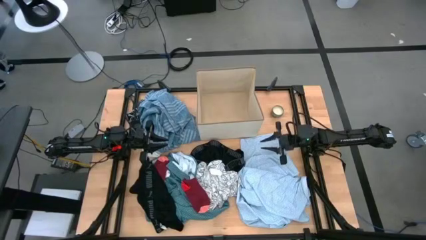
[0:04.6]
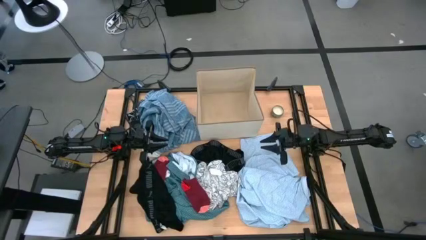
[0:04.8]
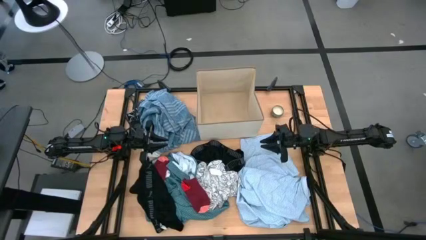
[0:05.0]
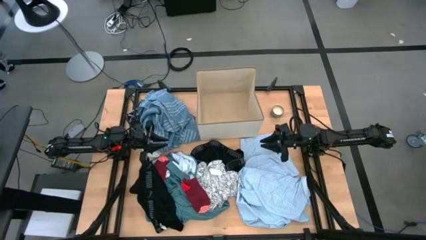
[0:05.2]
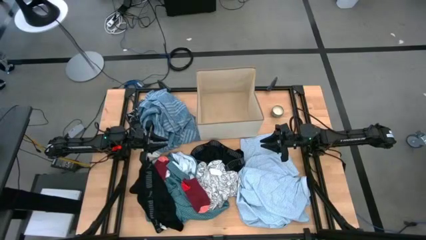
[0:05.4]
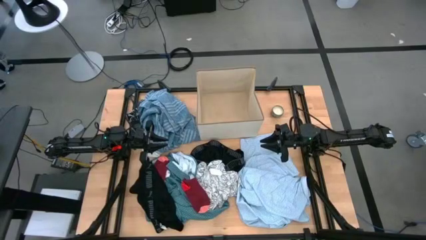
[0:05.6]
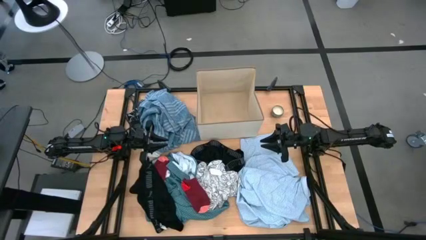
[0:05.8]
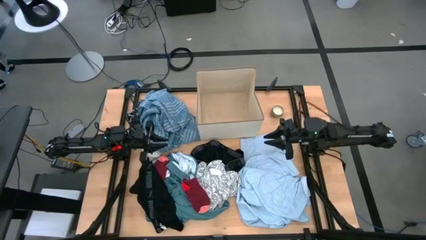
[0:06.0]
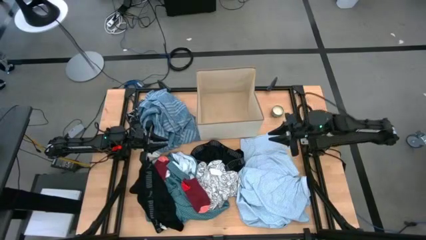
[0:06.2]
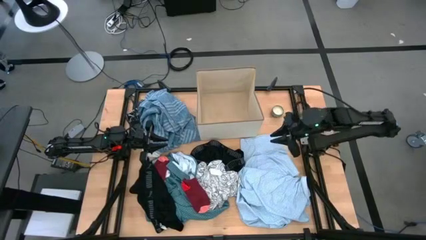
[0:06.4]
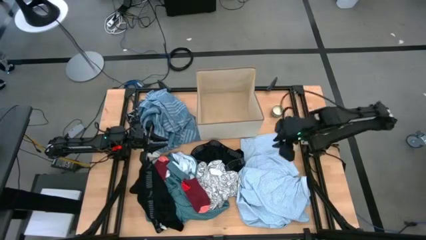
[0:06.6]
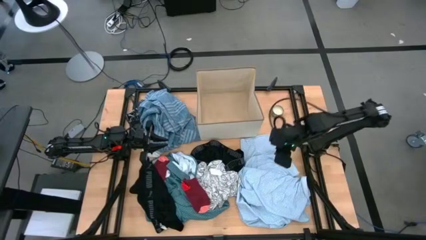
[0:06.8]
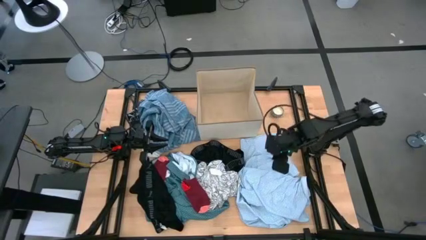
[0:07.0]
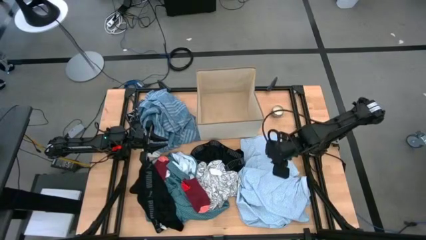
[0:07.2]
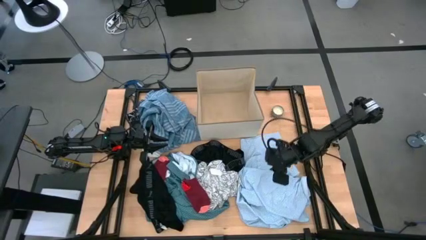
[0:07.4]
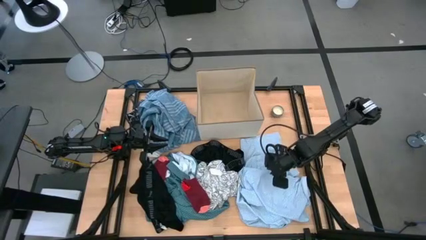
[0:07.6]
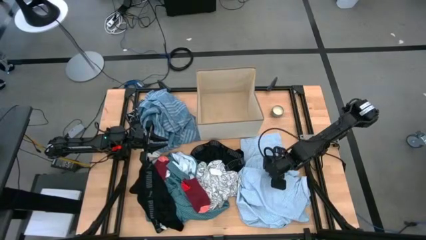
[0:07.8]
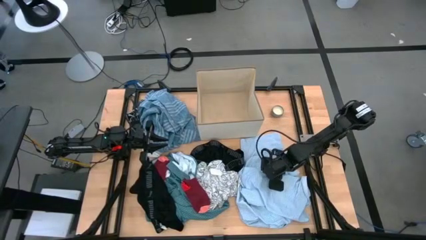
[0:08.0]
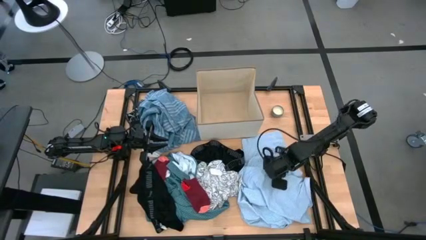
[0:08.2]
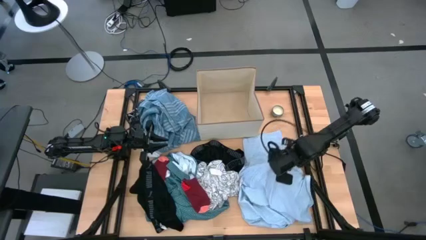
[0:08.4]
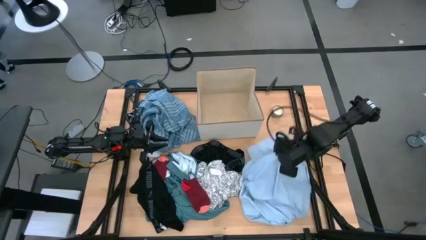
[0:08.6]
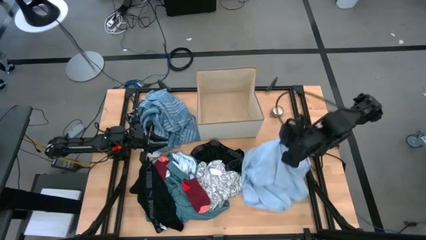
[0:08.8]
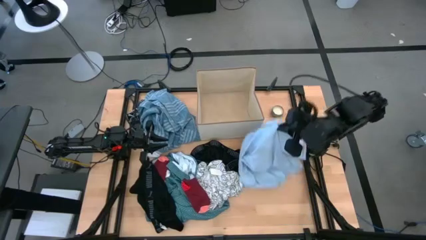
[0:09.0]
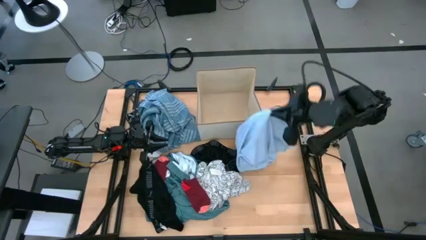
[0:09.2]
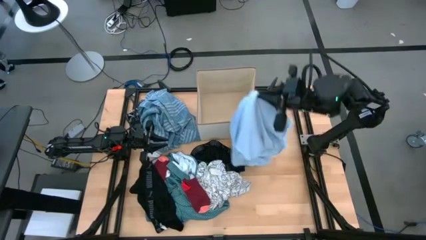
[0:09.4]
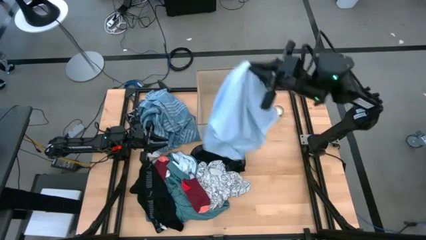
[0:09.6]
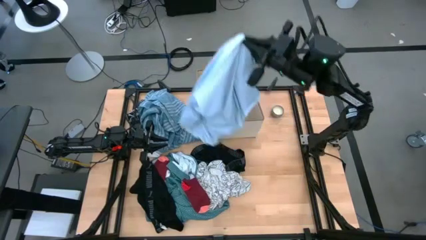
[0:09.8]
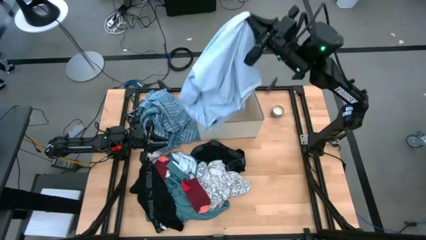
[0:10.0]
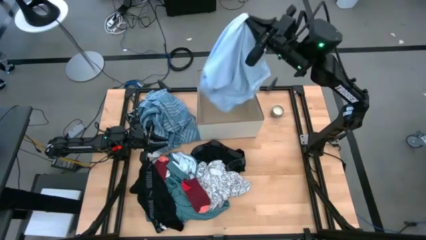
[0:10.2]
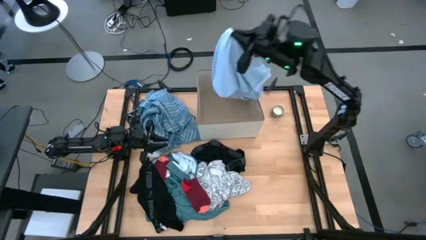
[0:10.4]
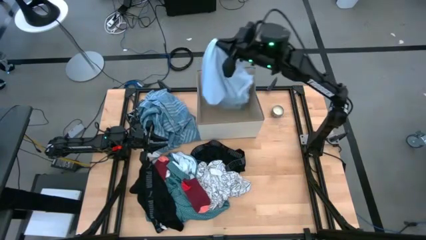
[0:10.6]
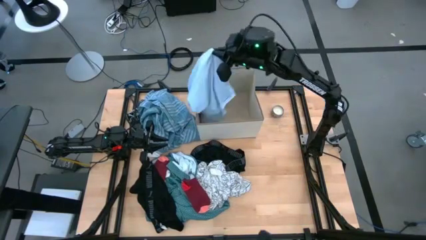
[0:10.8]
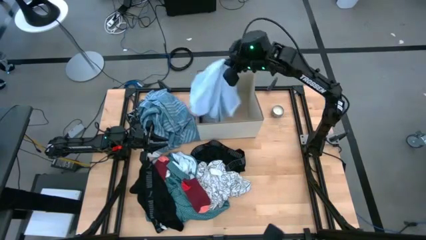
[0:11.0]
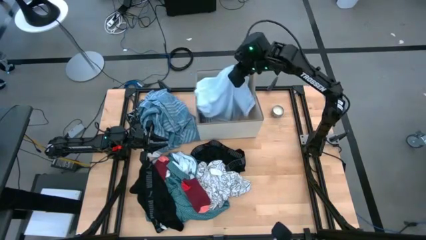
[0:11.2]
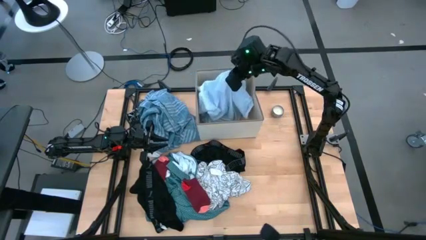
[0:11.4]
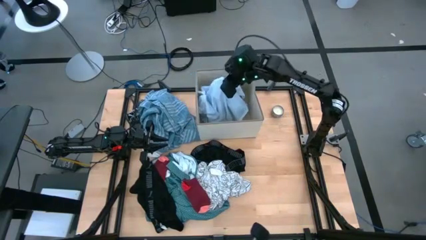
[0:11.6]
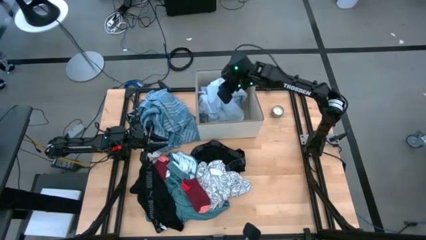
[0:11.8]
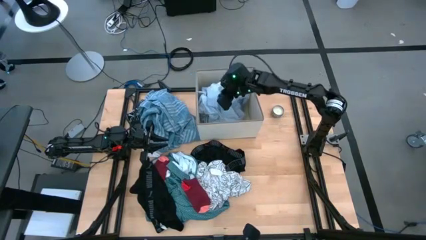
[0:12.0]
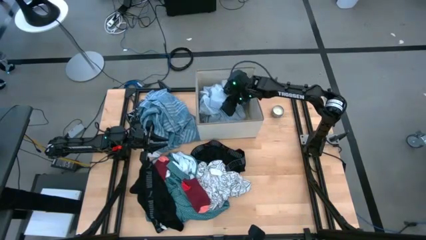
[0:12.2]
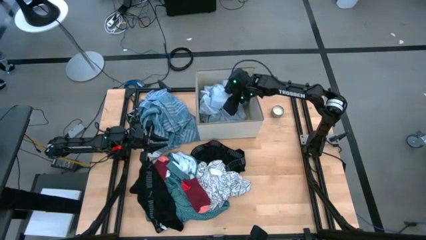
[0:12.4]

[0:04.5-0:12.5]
Task: Sort clothes
Put the white shirt into the bin

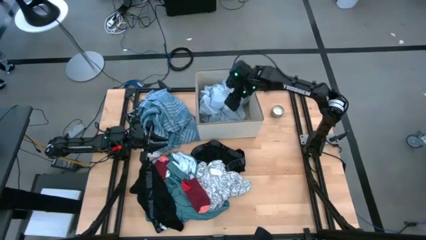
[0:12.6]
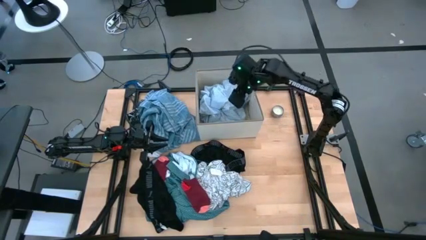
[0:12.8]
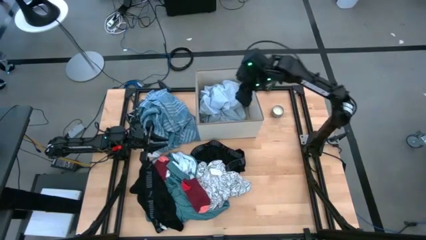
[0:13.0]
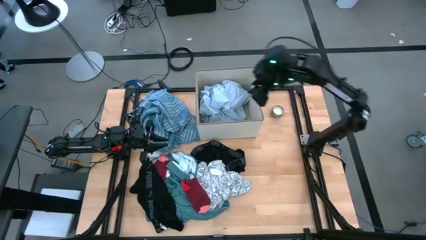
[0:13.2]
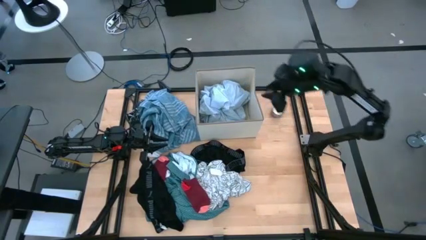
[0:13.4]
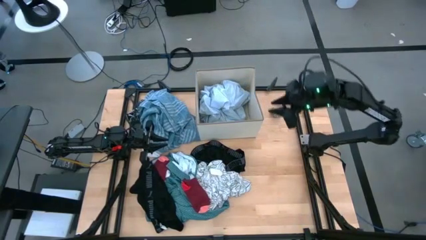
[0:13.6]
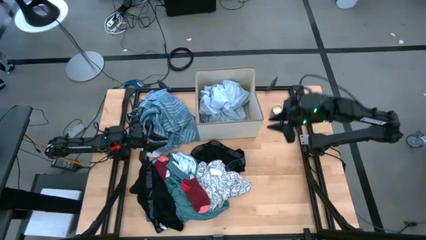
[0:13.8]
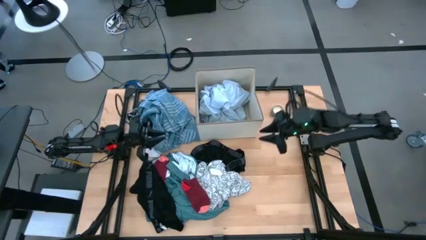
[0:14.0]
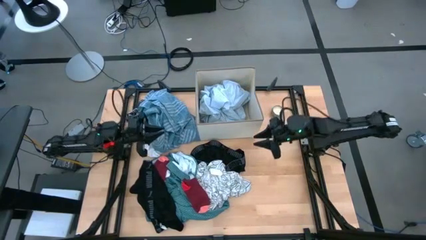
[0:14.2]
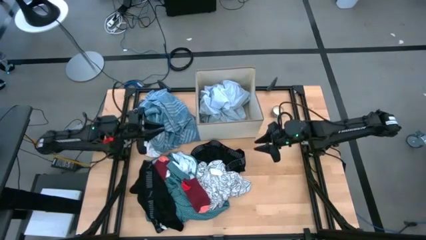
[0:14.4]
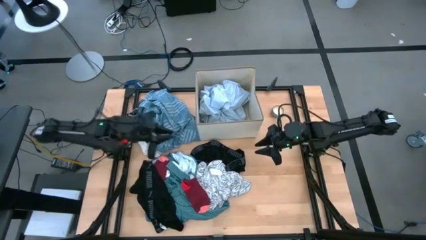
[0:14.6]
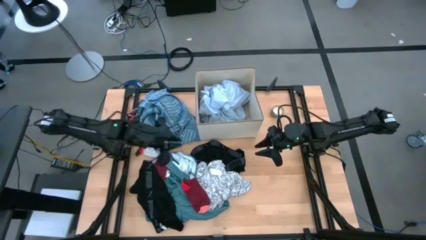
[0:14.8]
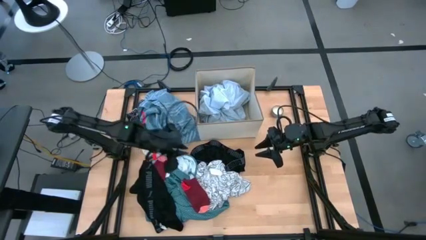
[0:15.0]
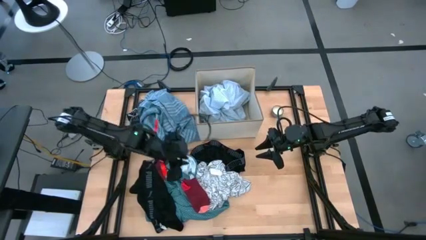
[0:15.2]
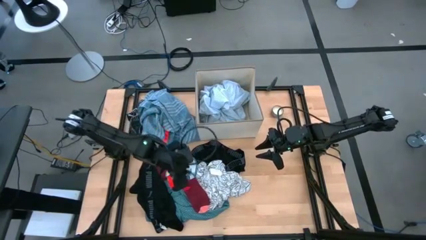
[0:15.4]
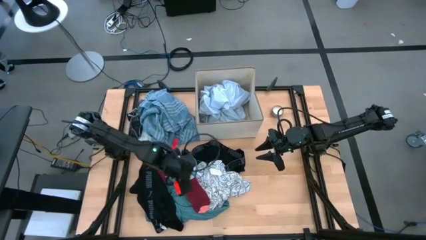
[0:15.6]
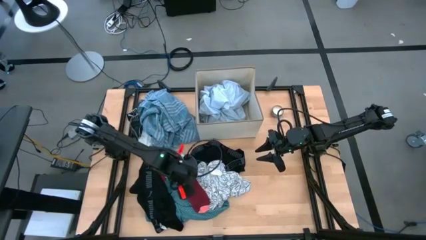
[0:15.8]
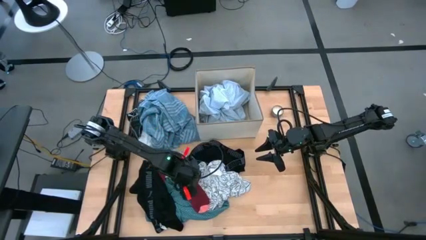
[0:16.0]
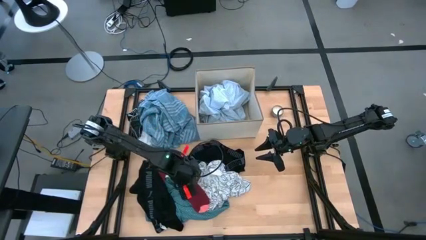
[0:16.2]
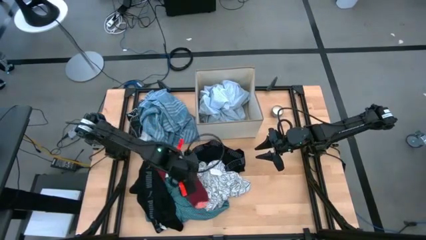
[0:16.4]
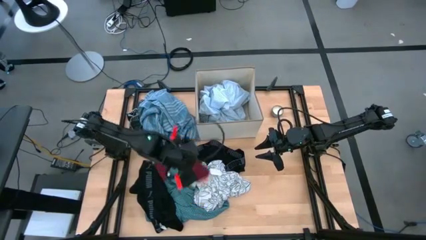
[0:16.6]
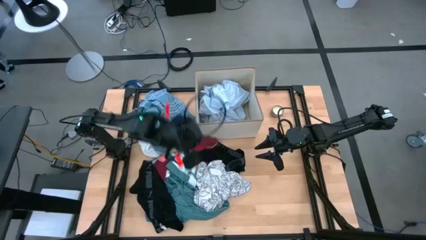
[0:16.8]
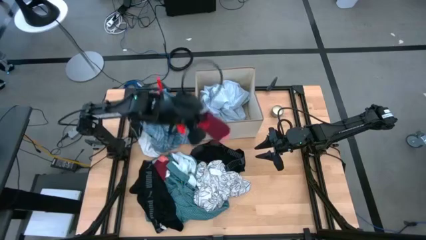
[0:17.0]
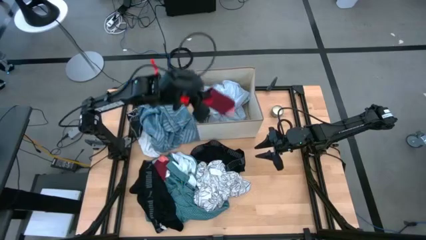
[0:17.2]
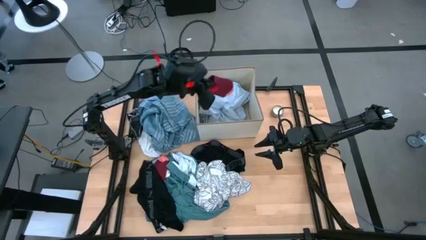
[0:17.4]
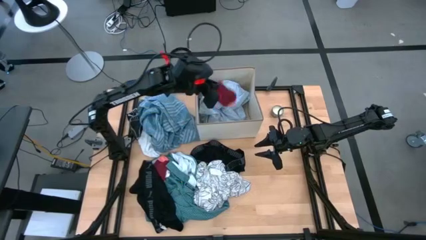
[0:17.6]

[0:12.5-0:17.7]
Put the right red sock into the bin

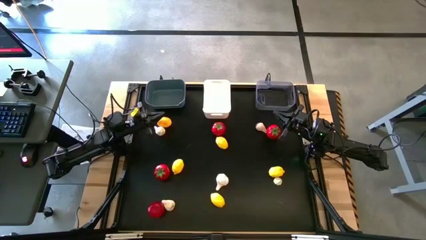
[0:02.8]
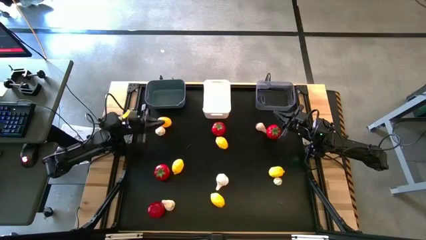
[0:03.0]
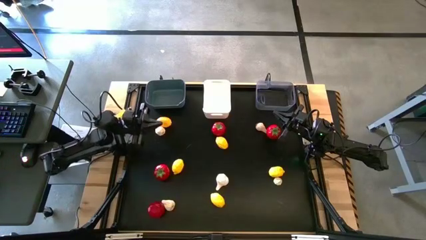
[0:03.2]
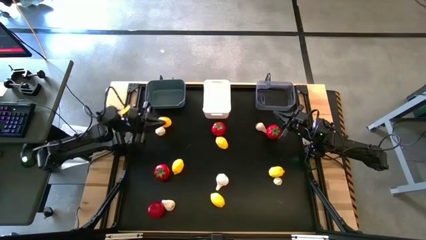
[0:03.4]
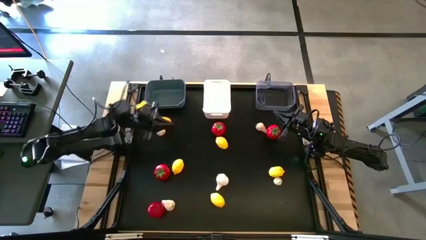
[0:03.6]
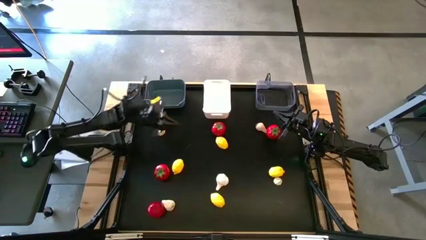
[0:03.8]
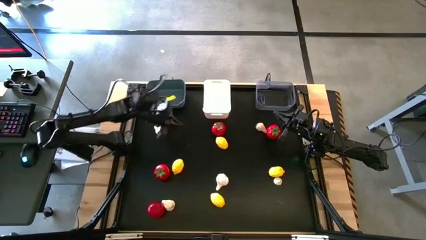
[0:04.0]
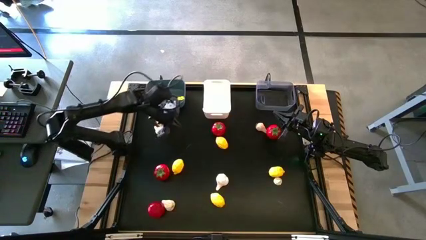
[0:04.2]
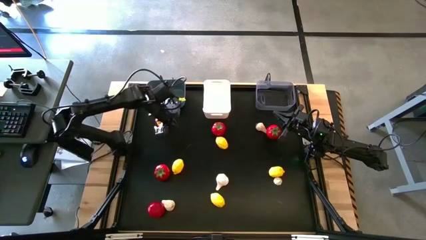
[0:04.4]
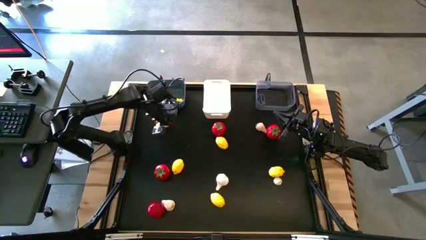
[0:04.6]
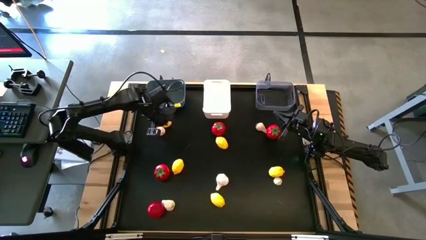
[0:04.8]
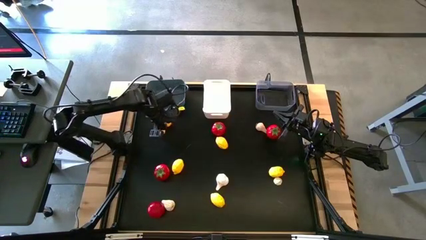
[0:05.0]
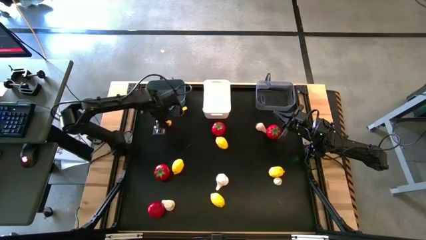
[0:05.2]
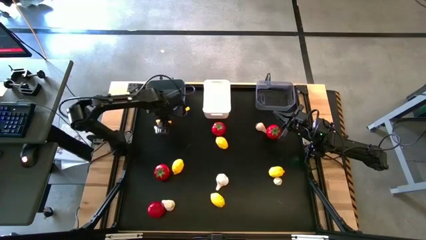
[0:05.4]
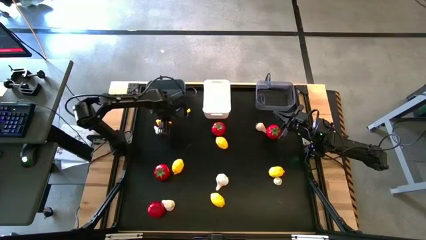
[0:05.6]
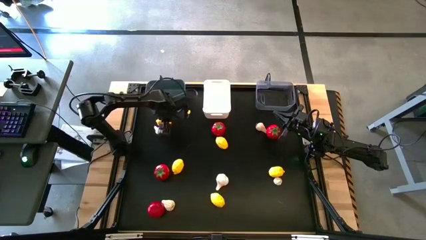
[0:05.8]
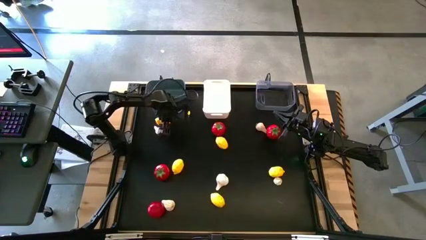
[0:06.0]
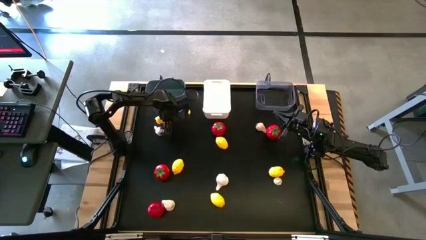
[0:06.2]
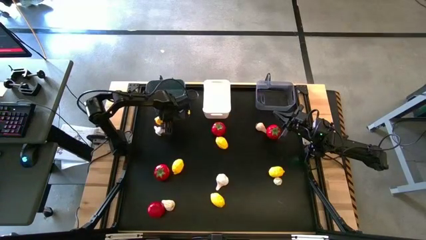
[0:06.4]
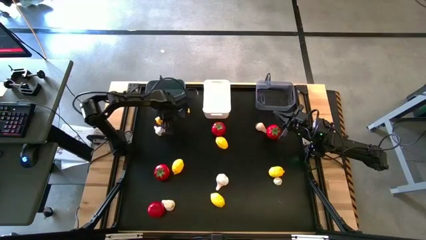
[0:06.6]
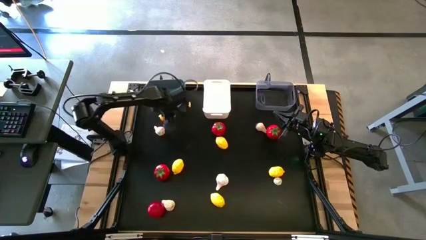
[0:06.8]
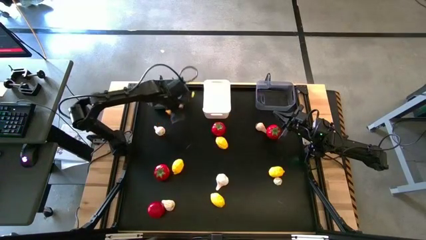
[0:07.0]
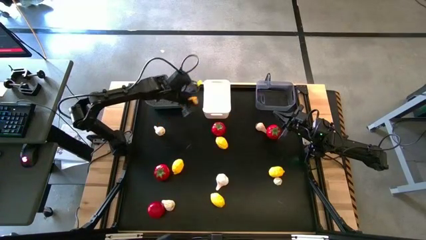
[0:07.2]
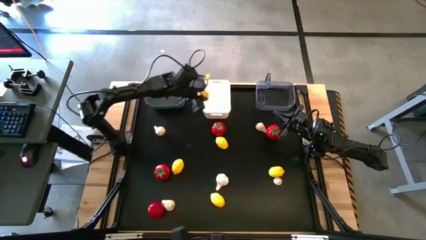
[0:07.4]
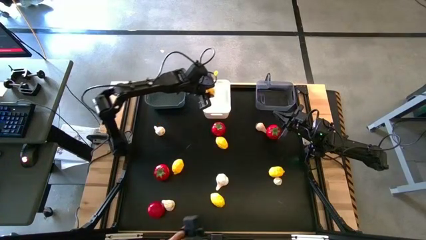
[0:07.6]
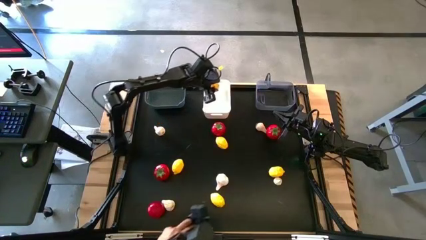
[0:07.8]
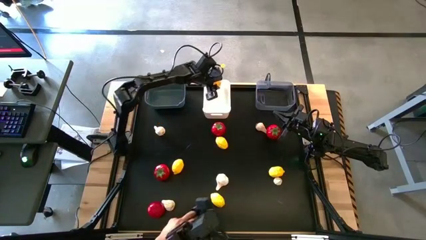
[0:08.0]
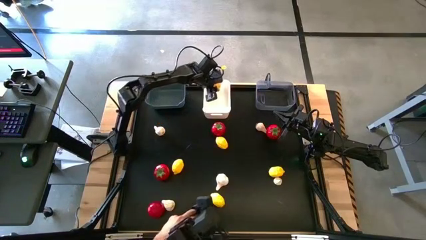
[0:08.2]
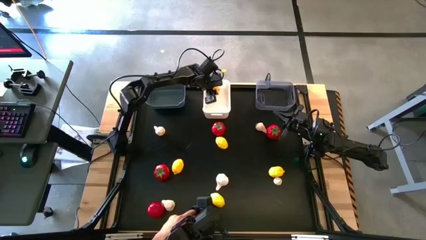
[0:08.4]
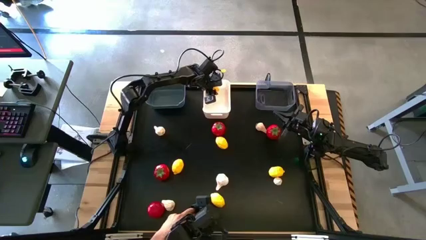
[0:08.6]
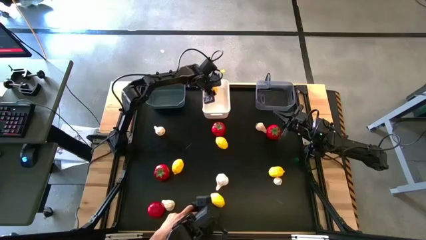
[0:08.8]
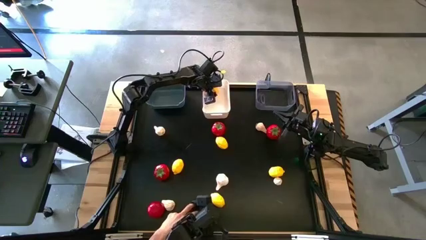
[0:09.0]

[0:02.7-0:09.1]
Task: Sort produce into baskets
Put the yellow lemon into the white bin
